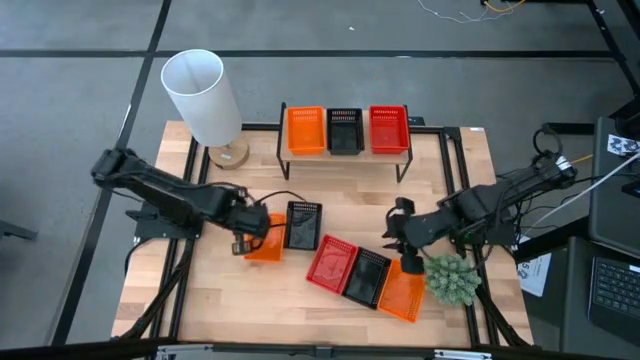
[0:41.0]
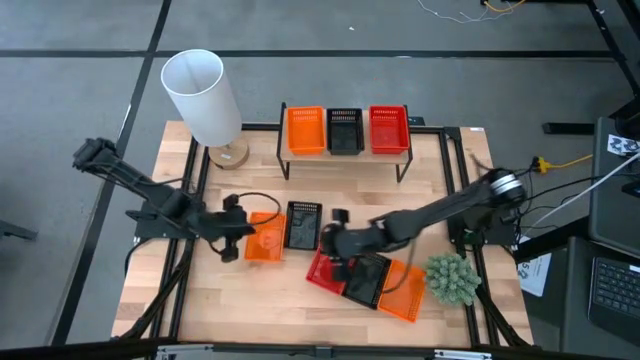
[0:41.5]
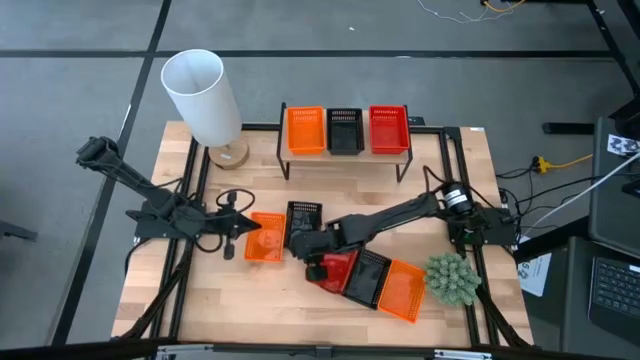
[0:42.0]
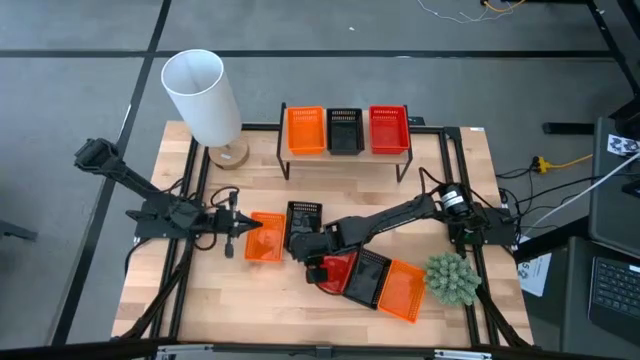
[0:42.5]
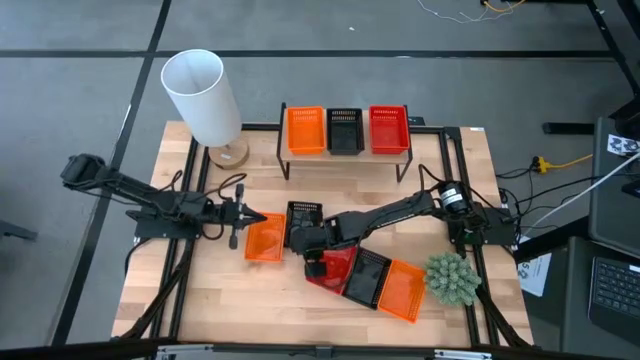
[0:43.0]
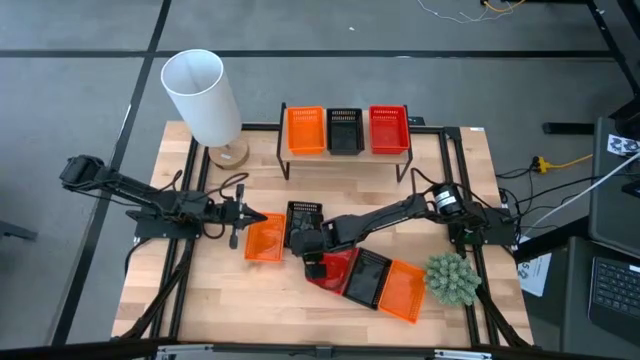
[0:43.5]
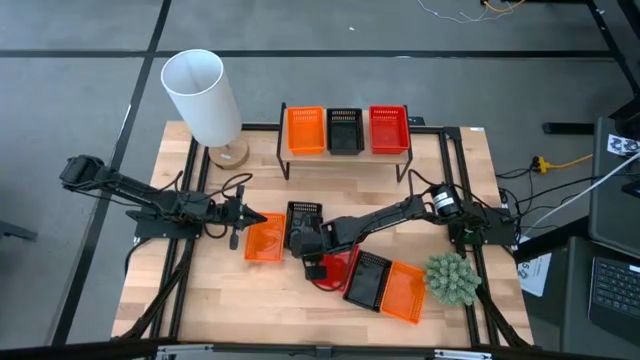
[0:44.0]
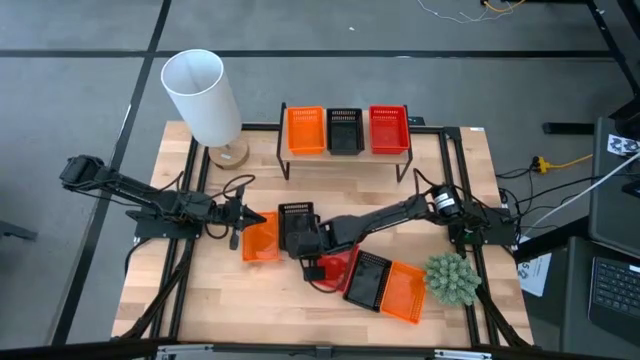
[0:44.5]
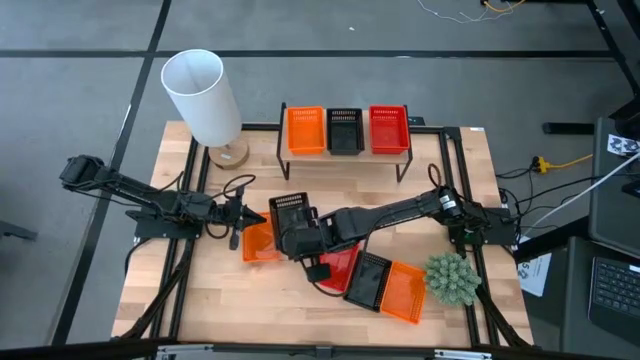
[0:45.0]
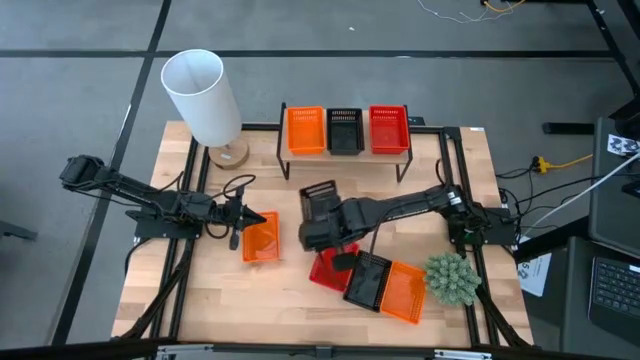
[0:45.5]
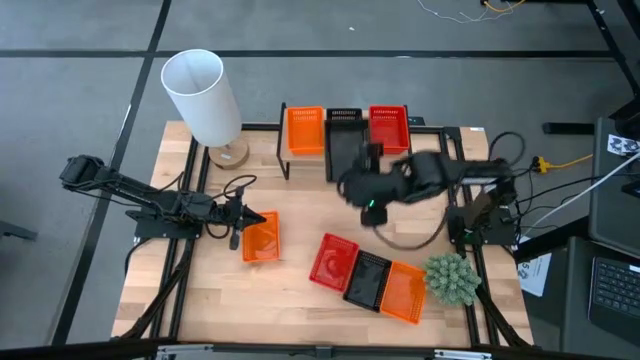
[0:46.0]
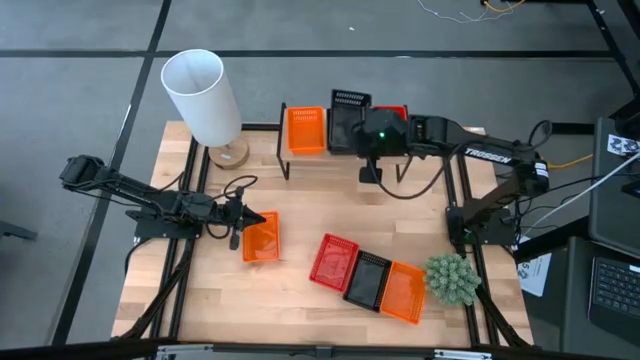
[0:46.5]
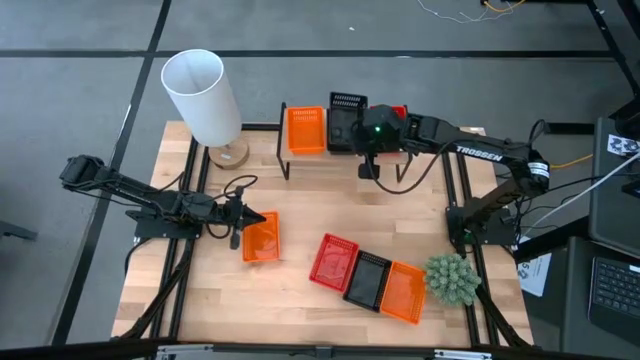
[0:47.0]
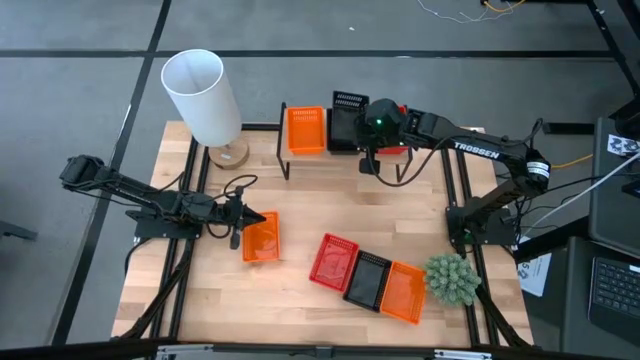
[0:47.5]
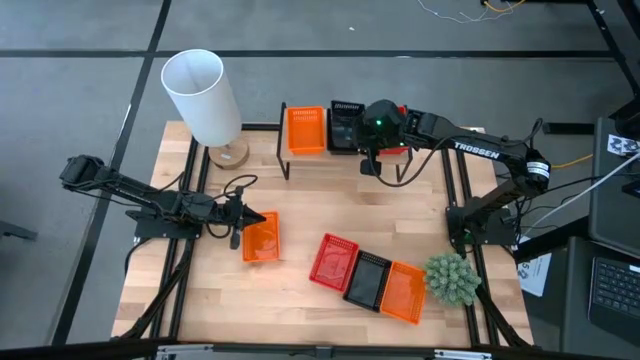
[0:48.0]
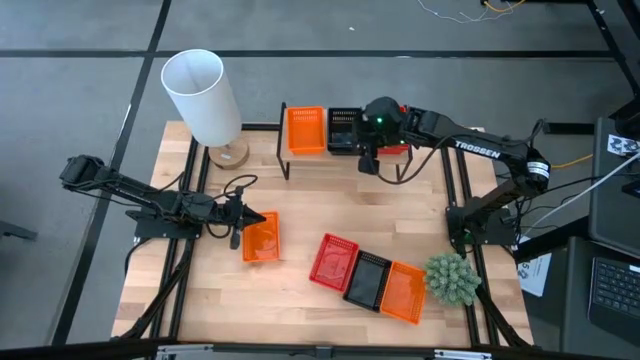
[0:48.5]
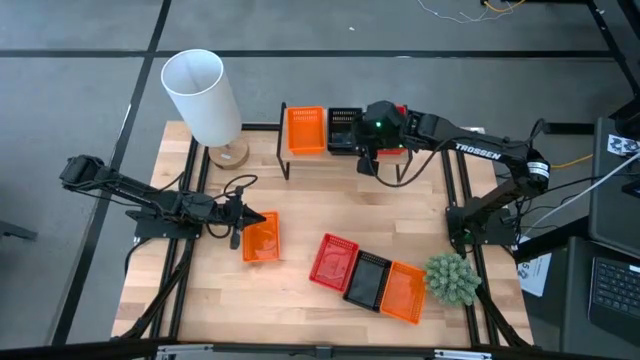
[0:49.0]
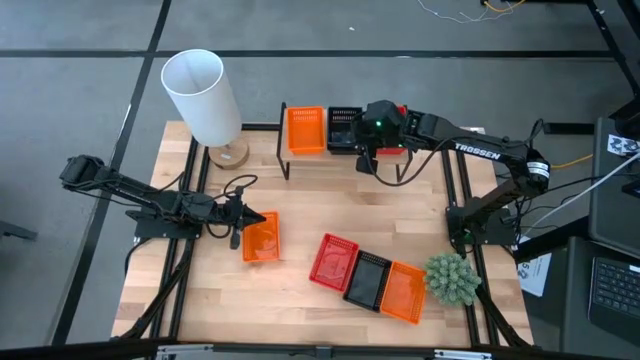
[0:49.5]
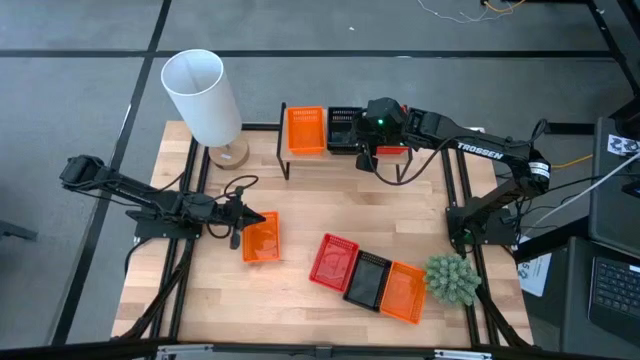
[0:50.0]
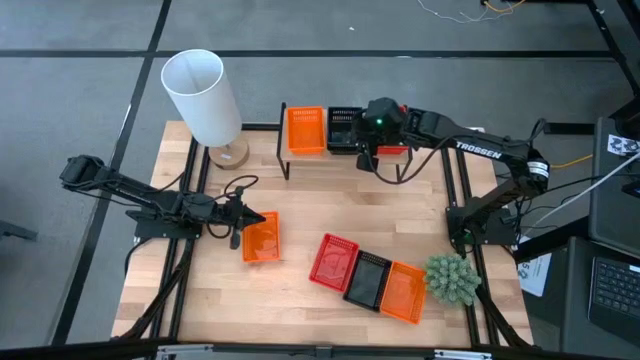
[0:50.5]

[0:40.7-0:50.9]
Task: Stack baskets on shelf by color
Stack the bottom left black basket on the black basket on the top shelf

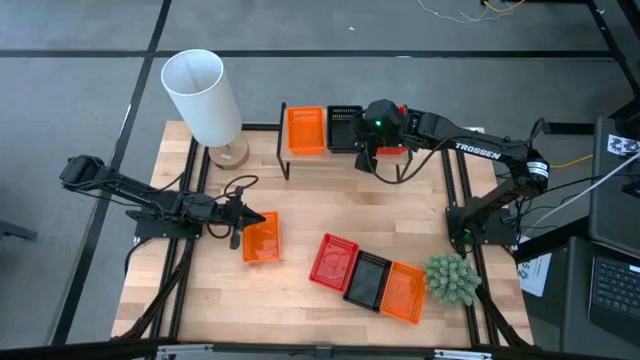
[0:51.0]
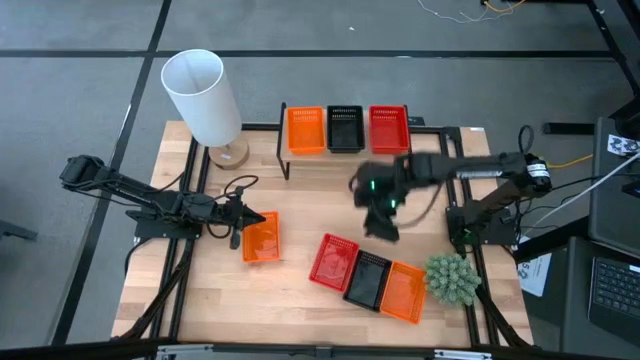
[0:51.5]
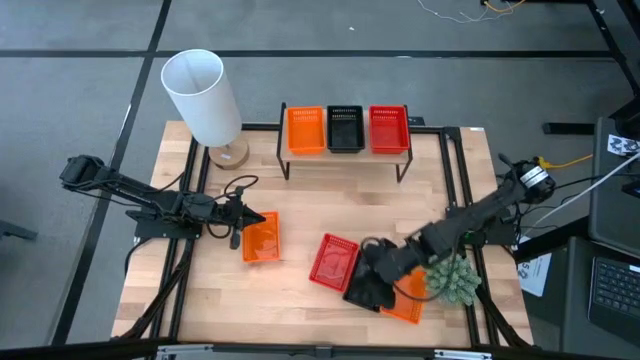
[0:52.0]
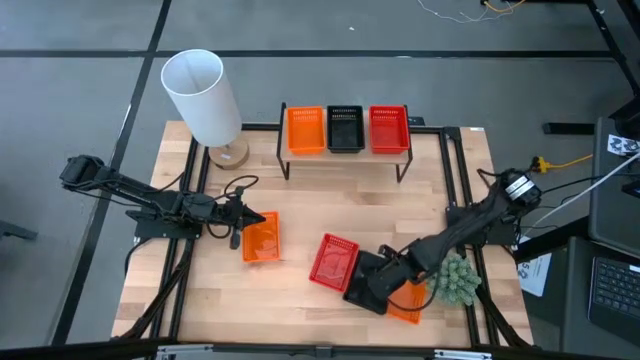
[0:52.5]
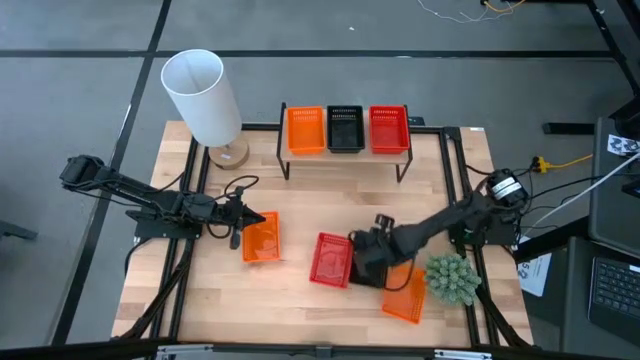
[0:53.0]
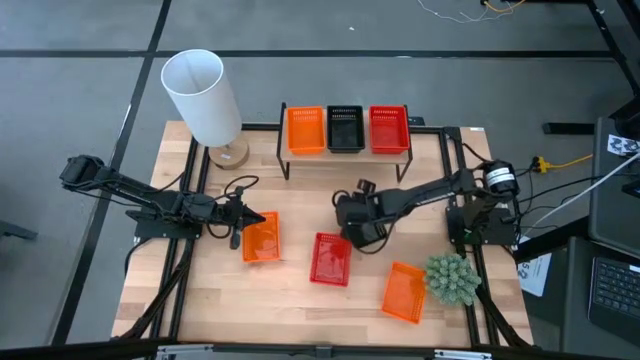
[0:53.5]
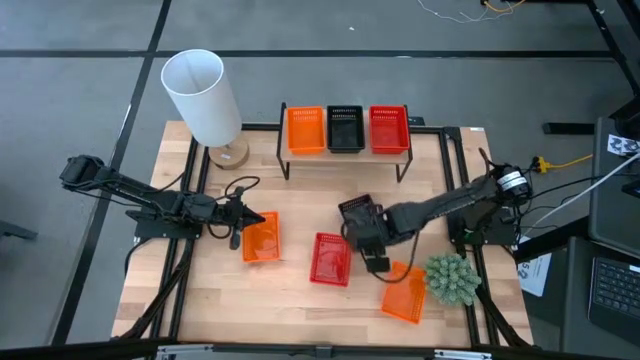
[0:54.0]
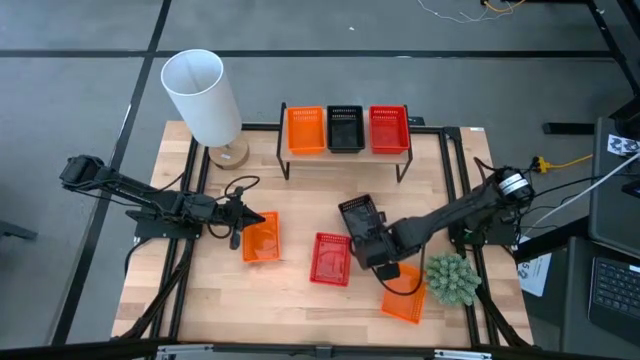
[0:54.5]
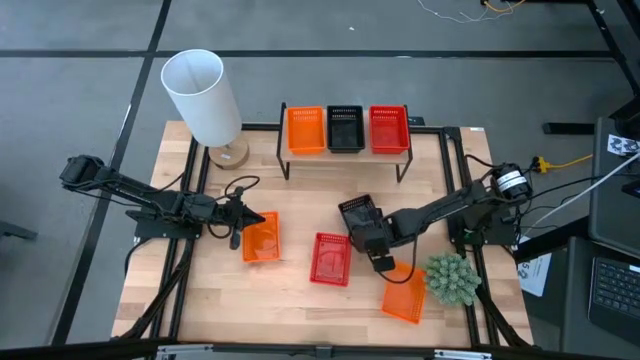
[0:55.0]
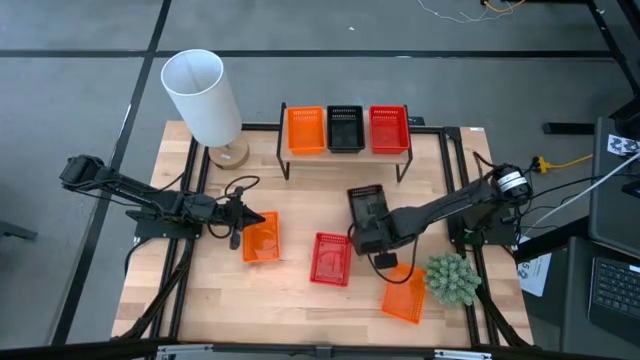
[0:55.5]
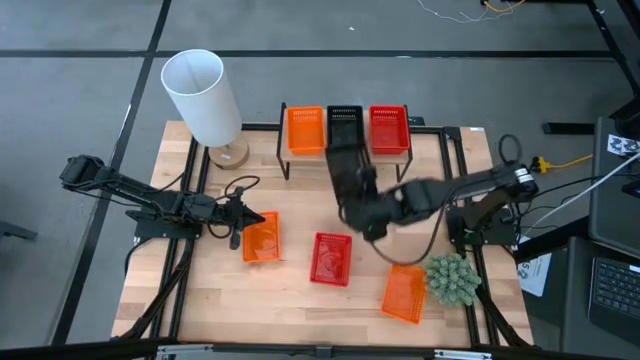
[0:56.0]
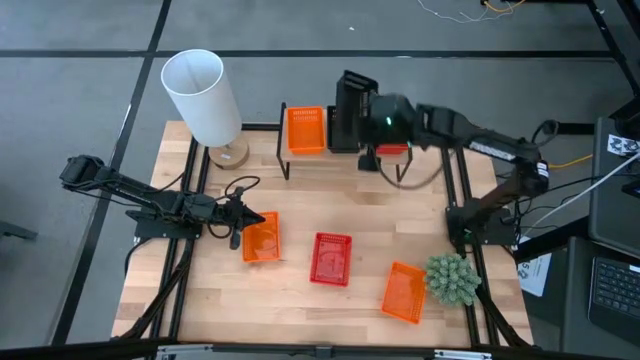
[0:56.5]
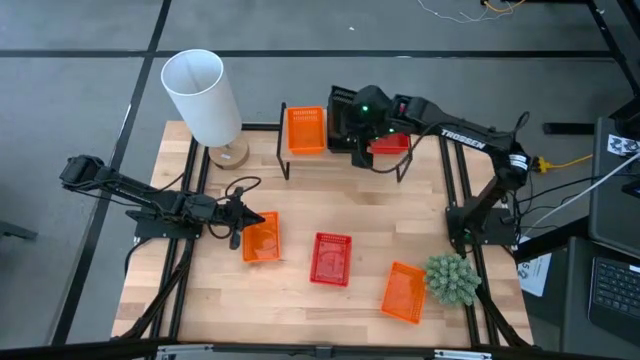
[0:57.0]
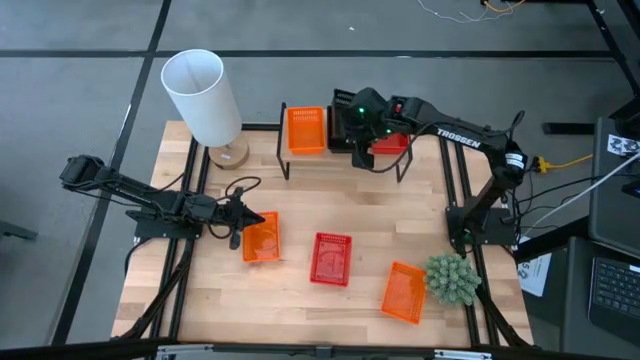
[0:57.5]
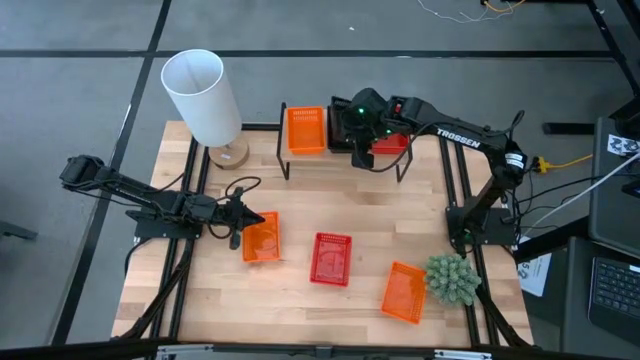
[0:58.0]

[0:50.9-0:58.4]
Stack the black basket on the black basket on the top shelf

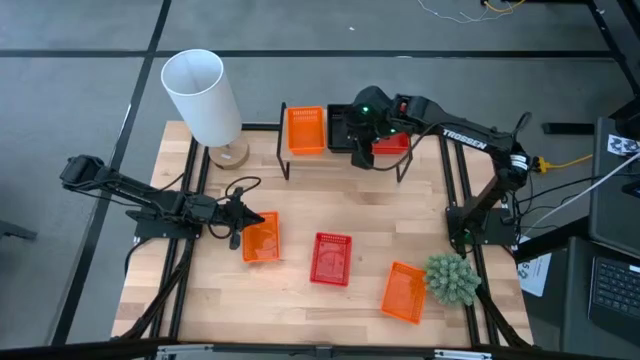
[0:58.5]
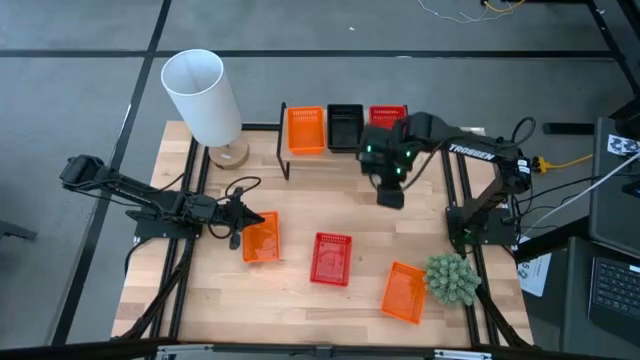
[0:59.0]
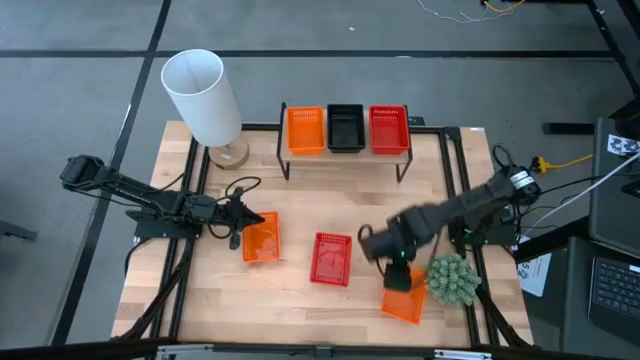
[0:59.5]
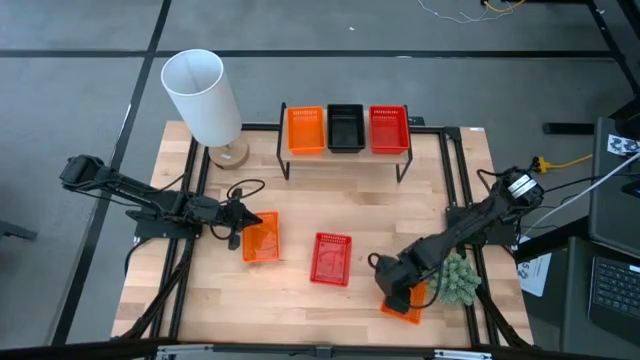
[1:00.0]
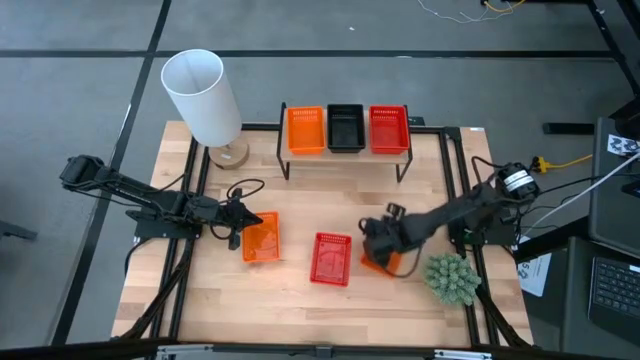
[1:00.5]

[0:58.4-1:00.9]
Move the orange basket to the middle-right of the table

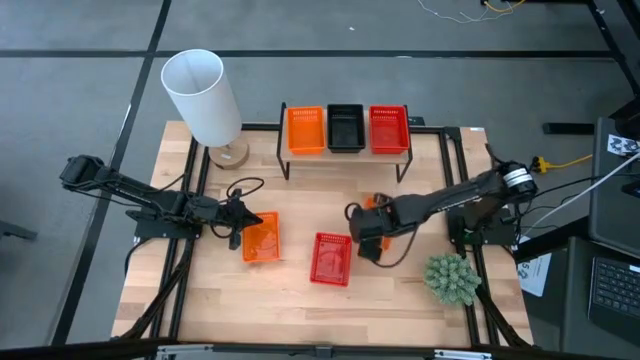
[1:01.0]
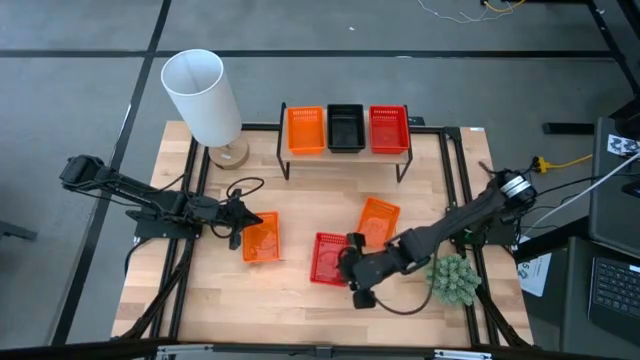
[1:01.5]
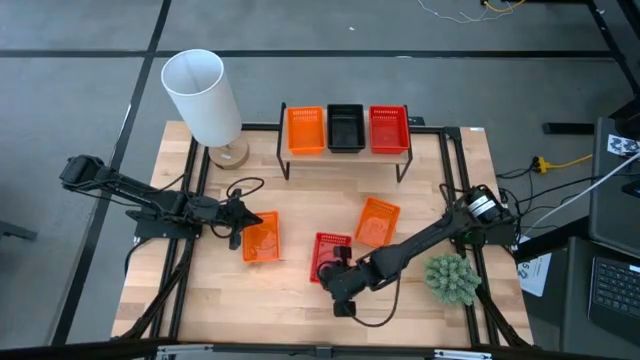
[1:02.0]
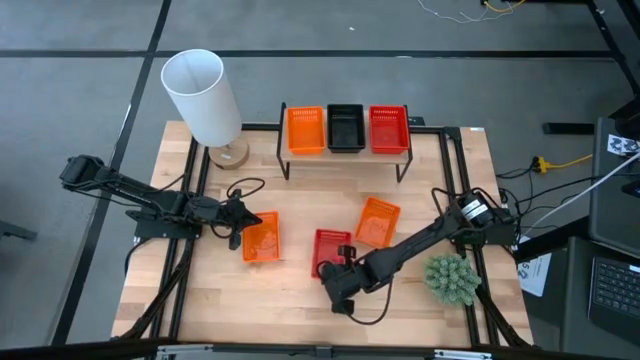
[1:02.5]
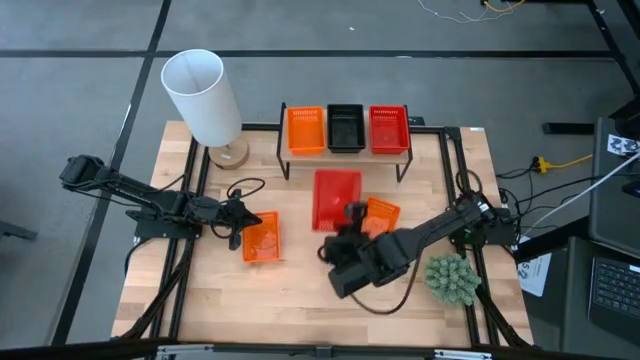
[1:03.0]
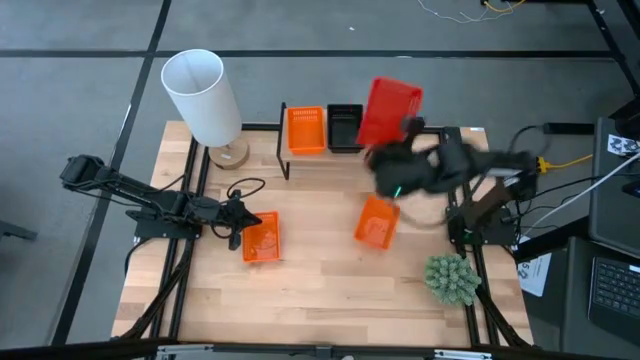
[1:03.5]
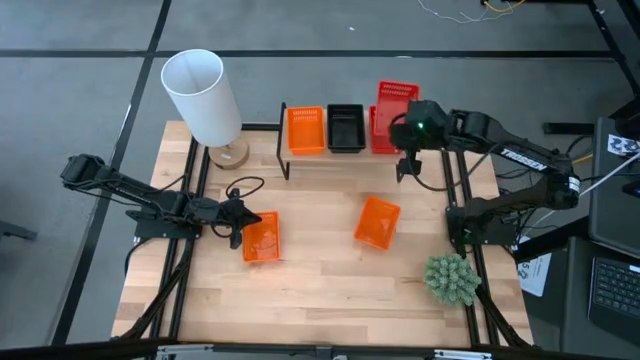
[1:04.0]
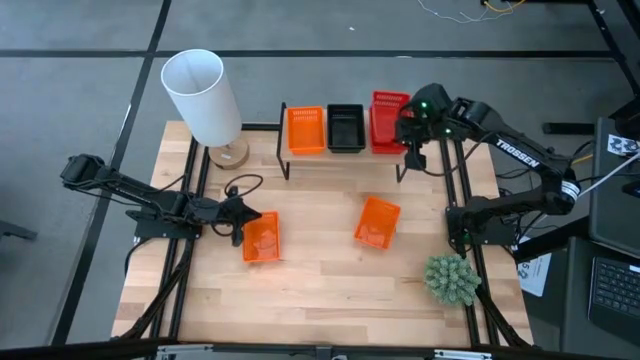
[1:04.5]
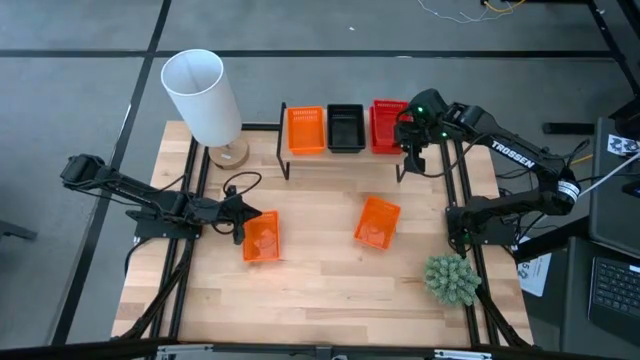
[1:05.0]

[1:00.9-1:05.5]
Stack the red basket on the orange basket on the top shelf
